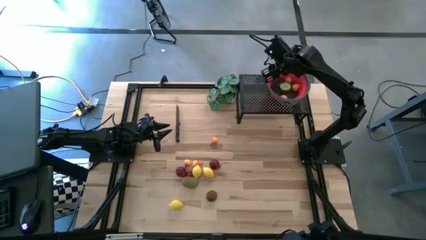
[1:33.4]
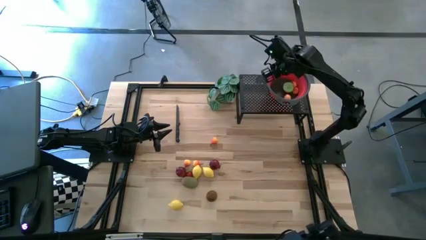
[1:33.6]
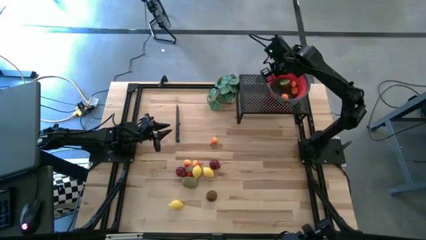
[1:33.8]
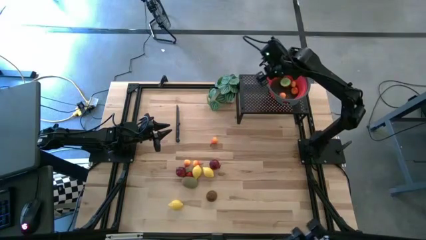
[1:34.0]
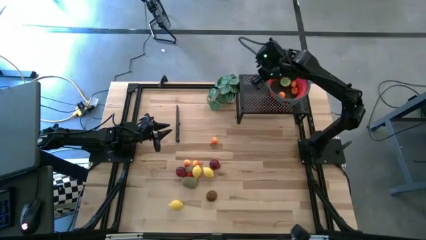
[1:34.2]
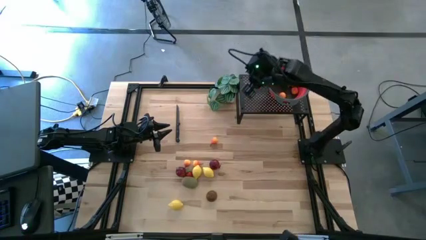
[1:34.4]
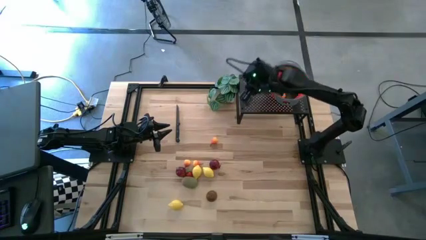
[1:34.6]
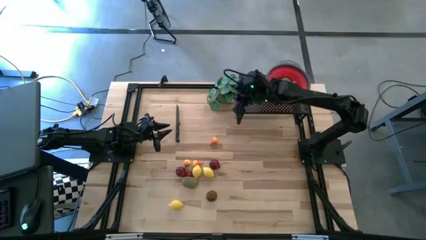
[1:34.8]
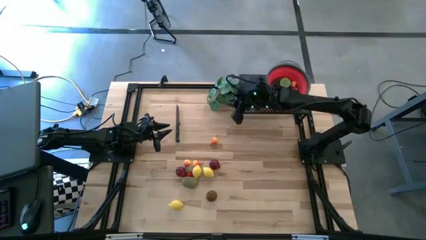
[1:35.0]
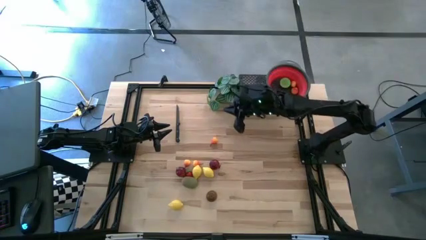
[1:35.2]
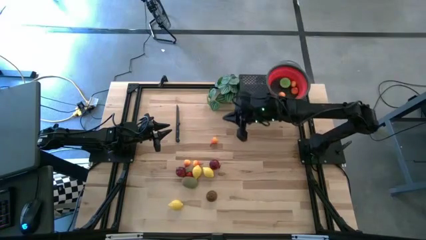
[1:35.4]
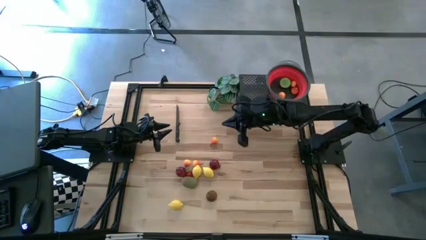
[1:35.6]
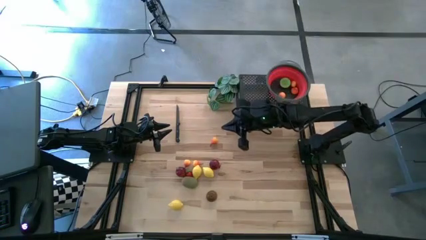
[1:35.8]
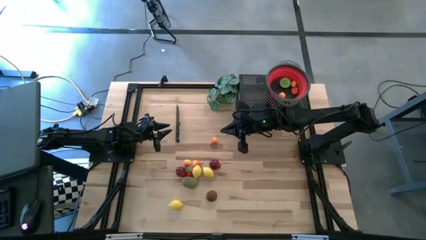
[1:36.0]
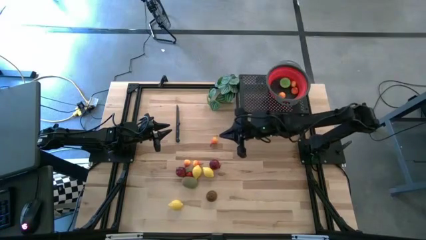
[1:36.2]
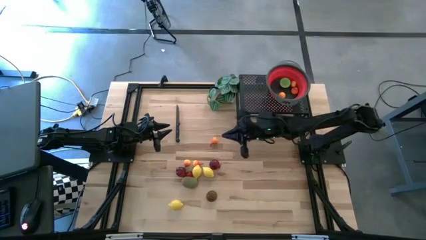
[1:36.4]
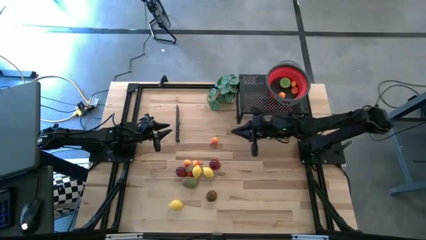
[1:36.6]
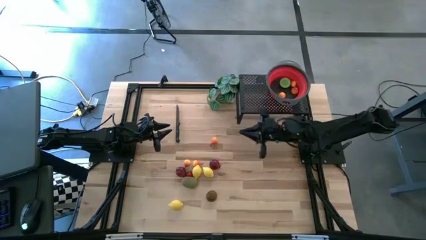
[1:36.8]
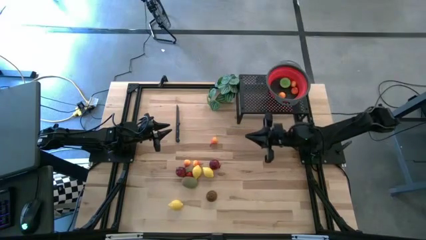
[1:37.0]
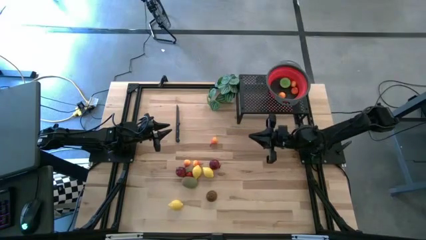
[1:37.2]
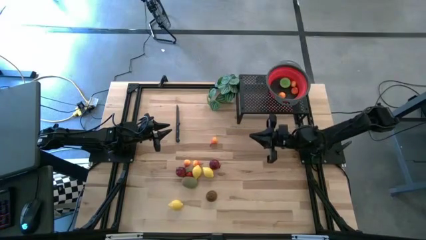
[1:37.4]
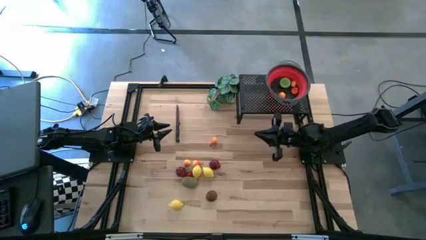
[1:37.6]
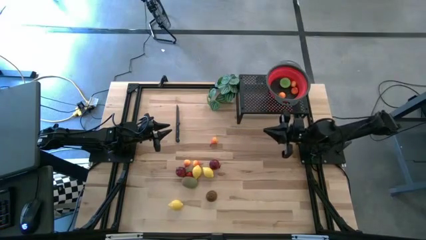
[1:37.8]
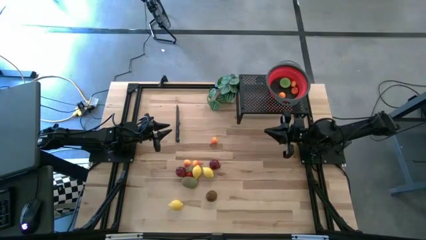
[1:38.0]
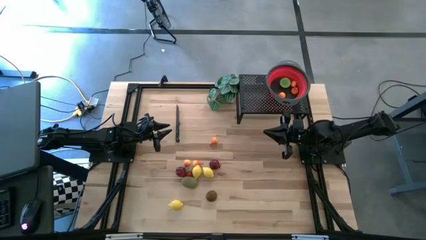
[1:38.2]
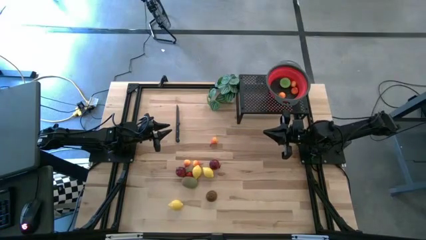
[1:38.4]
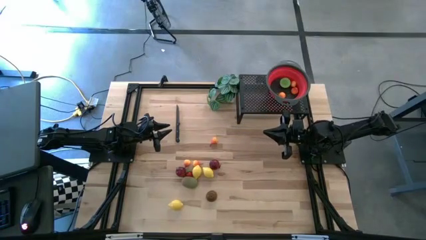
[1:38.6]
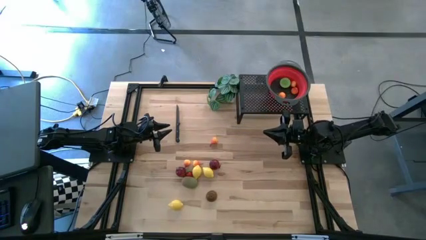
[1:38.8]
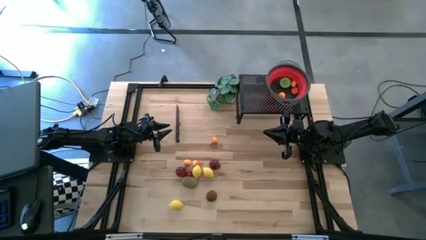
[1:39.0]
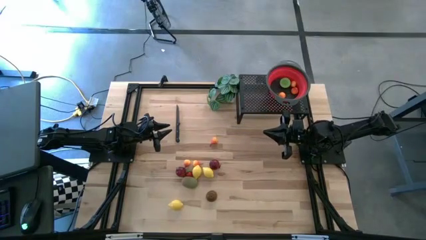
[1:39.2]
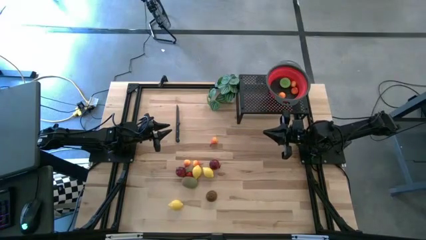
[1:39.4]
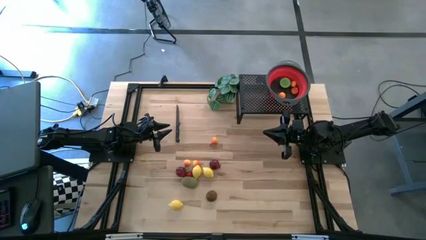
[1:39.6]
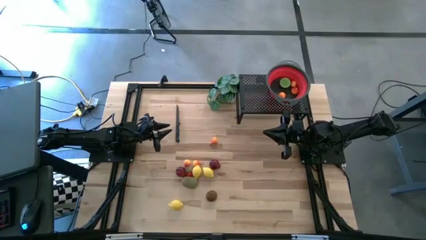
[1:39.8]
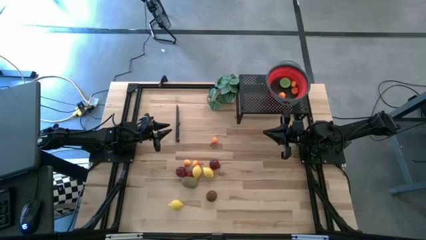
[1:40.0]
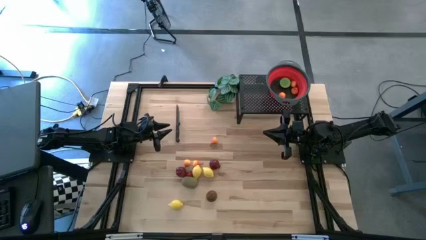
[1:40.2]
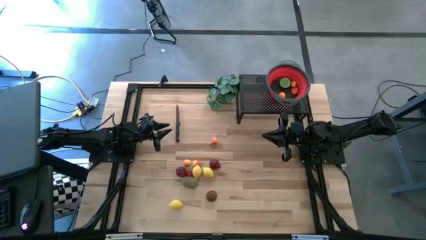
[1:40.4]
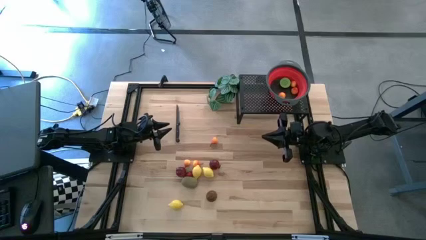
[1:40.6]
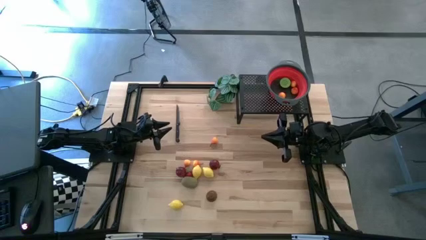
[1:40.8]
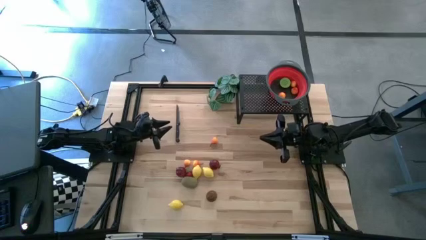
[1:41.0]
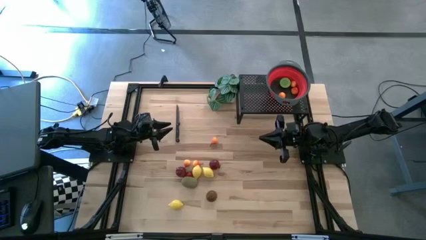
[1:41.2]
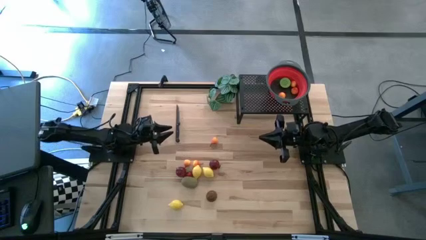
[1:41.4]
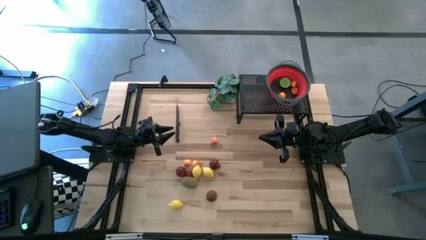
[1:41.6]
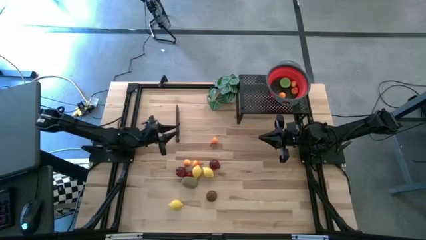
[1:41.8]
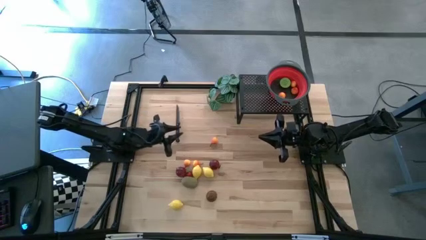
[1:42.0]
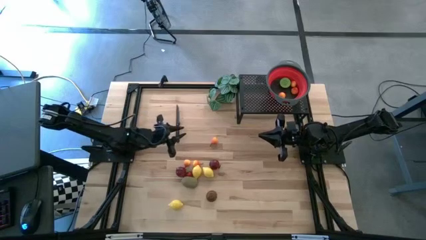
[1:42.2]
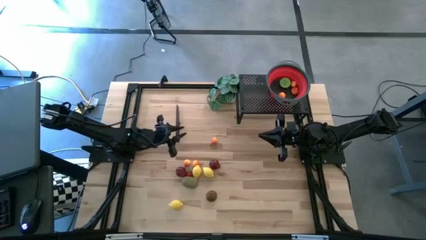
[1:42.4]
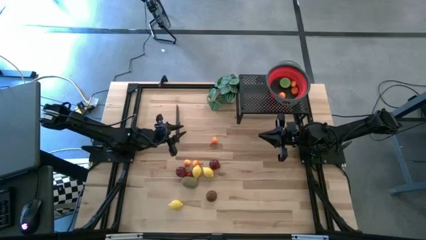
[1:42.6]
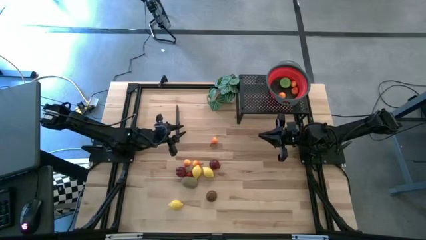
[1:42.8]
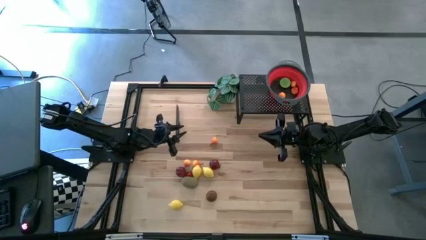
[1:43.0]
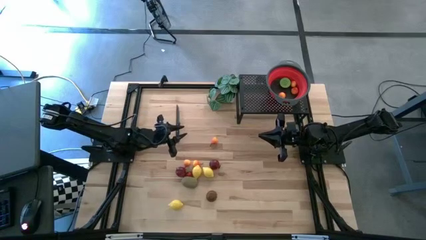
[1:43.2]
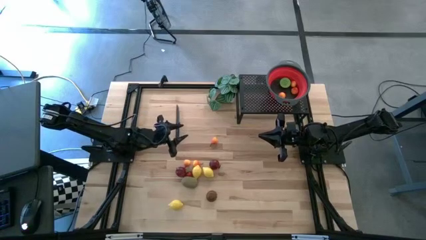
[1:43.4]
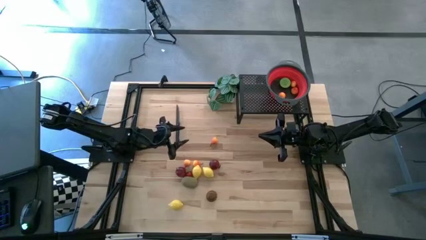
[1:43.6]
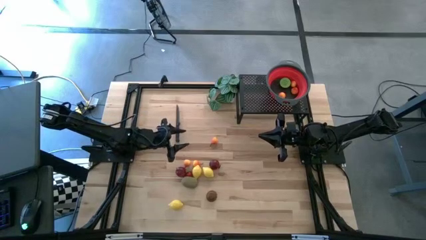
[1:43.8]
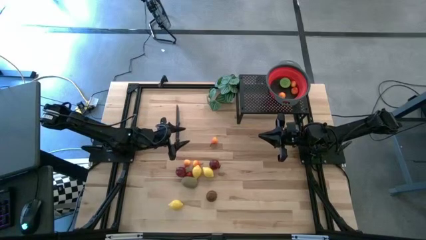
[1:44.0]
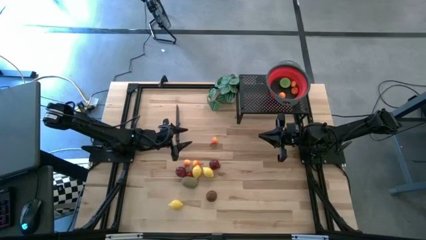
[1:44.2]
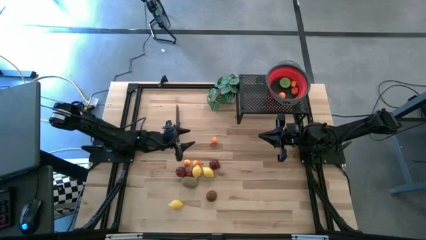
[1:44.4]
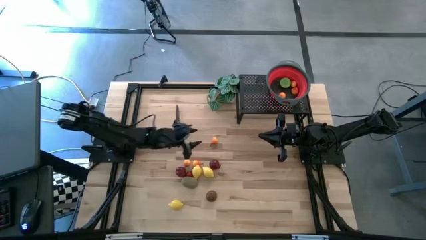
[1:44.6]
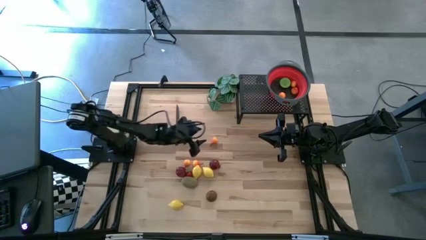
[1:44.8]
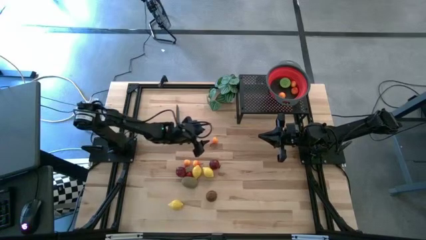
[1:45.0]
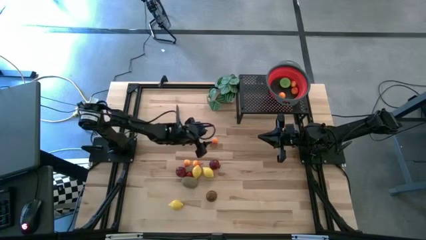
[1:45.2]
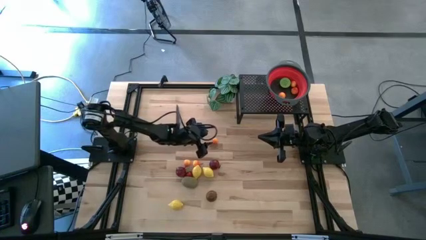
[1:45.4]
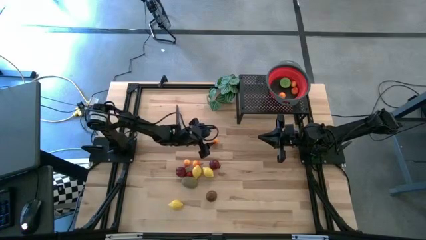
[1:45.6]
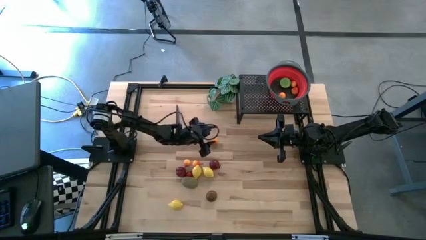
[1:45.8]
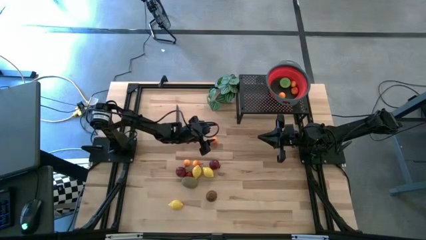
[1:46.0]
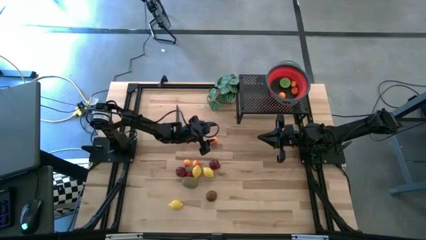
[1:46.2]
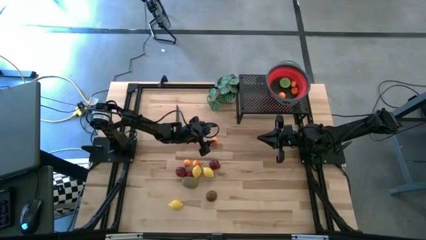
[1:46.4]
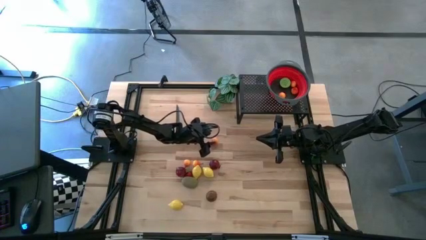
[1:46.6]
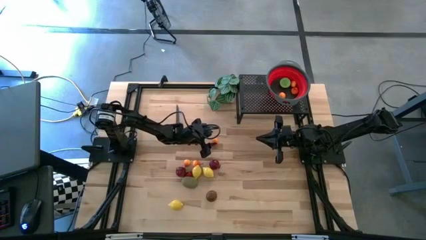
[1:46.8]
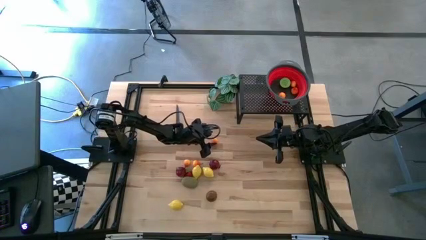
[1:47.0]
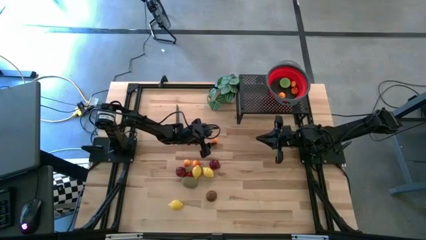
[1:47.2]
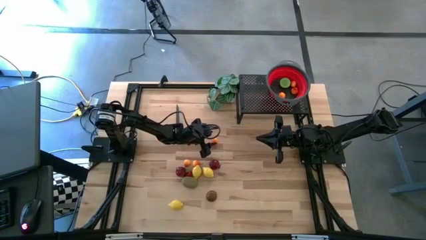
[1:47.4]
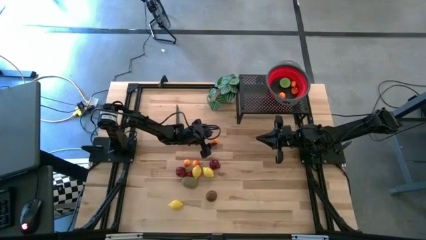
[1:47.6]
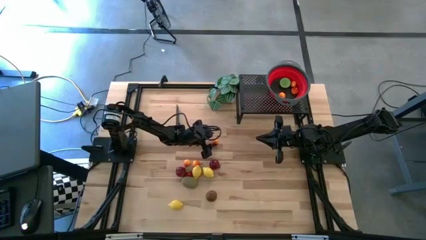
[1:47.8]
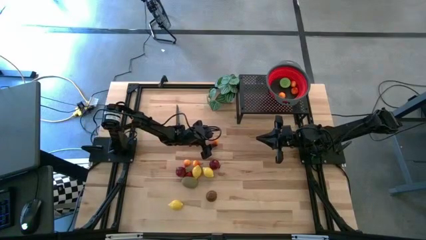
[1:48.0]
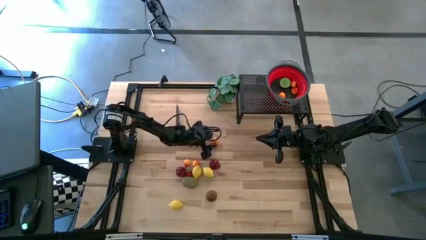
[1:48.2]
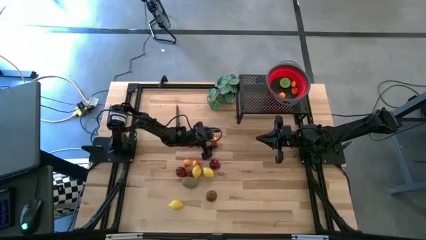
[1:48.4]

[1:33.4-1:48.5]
Task: Pick & Place Fruit
Put the orange pear into the red strainer bowl

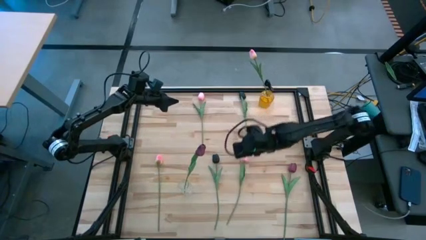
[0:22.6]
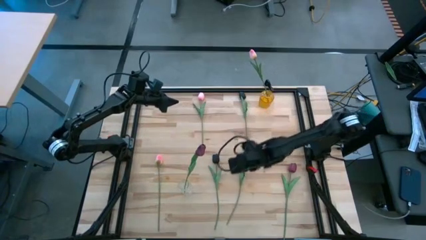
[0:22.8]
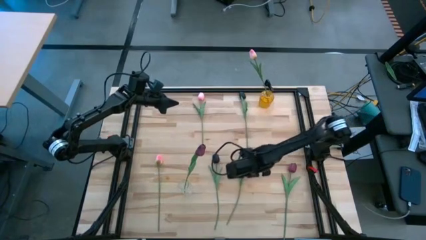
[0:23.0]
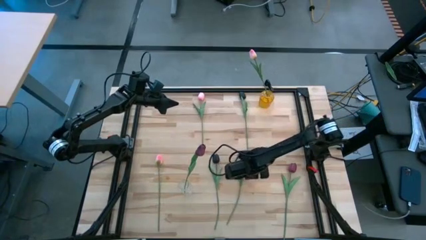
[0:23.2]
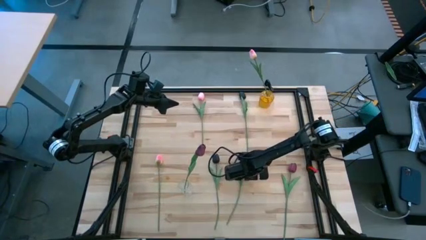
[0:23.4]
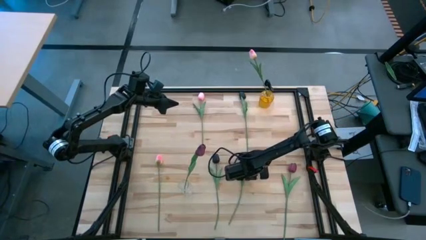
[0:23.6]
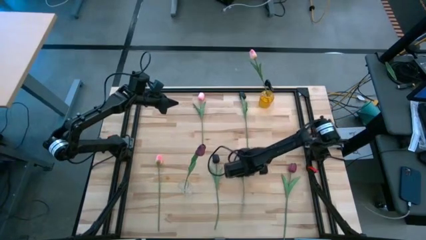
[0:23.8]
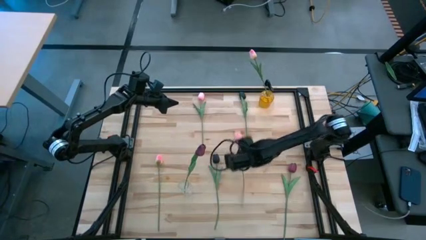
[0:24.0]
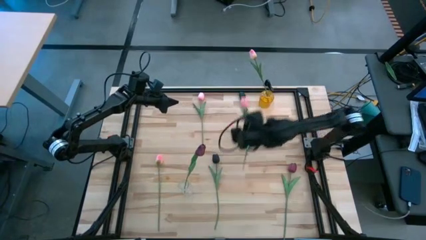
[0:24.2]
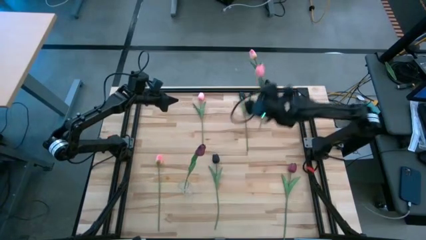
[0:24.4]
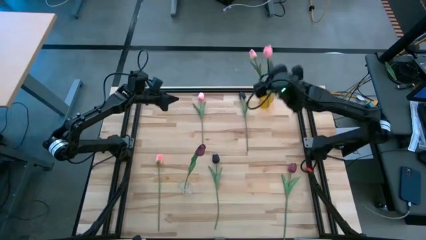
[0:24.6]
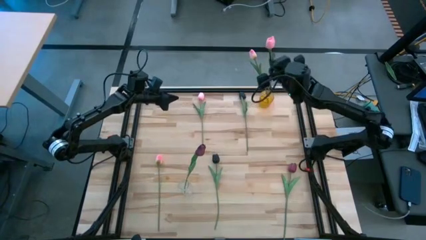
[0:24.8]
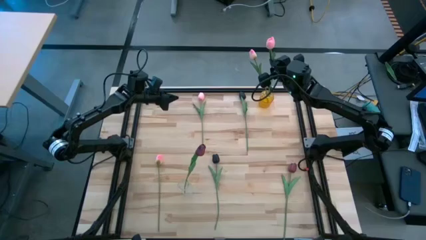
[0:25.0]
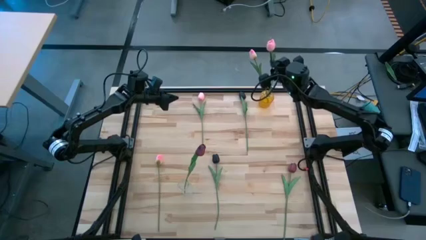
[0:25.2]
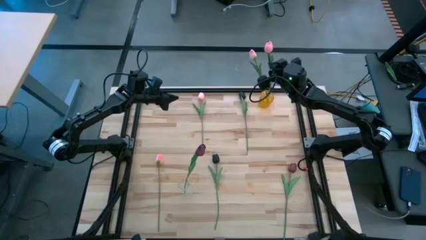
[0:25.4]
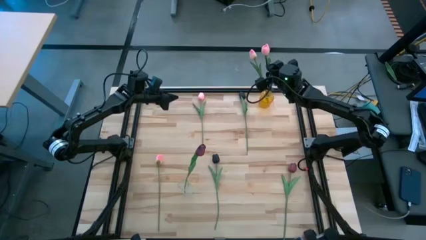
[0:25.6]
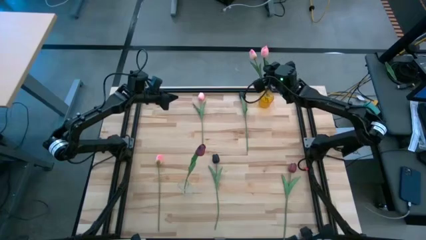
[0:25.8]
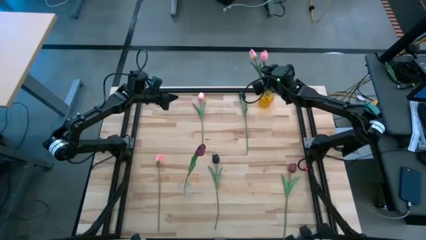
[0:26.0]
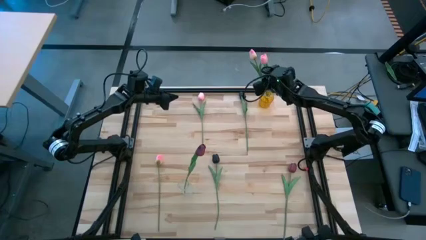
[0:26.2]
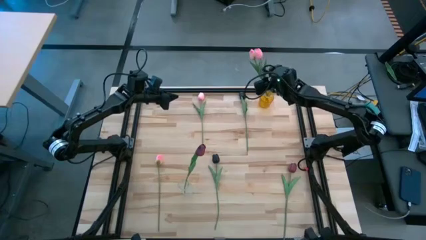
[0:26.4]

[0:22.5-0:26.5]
Task: Sort flowers into vase by color
Put the bottom center pink tulip flower into the yellow crystal vase
